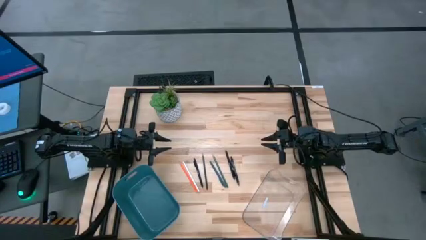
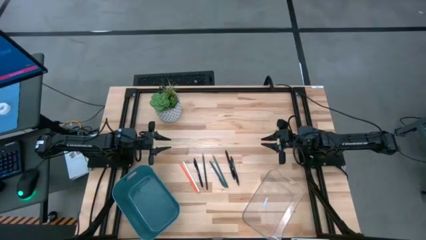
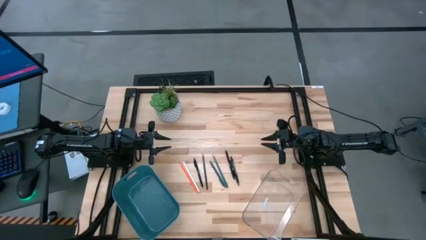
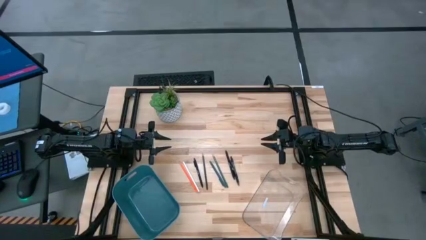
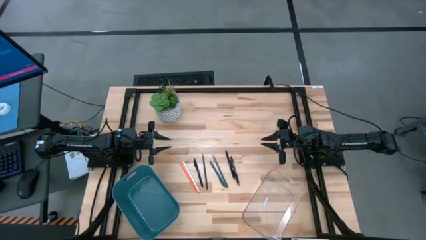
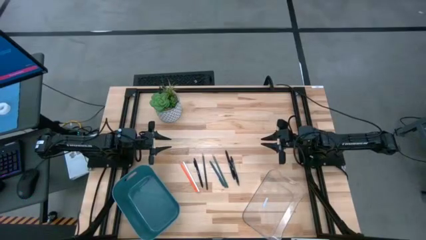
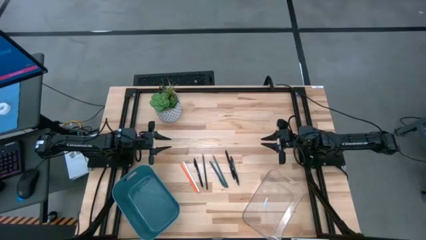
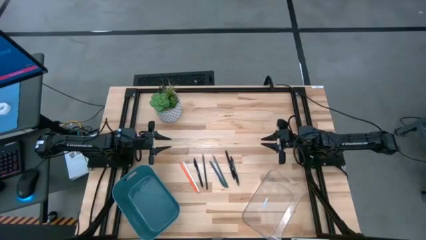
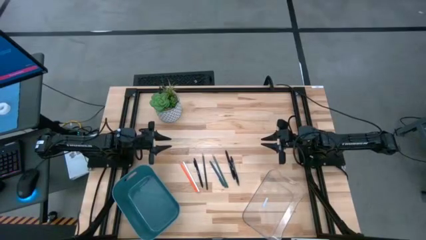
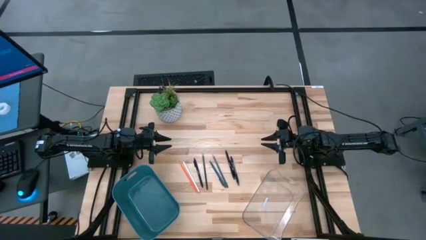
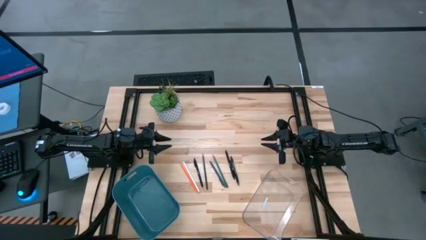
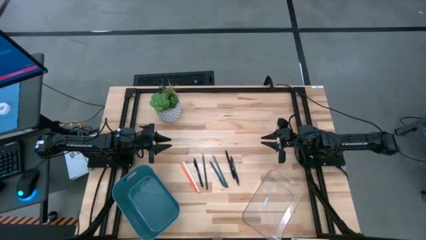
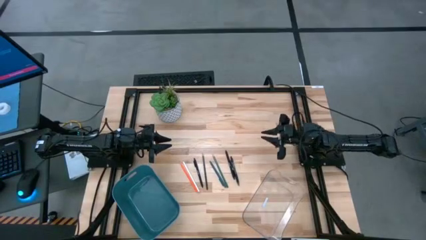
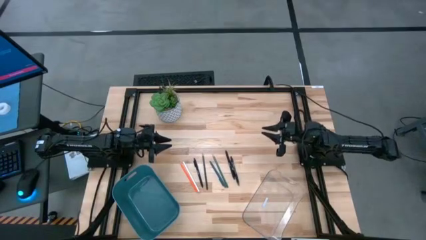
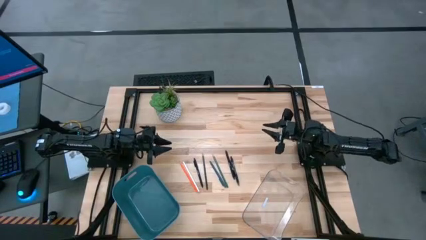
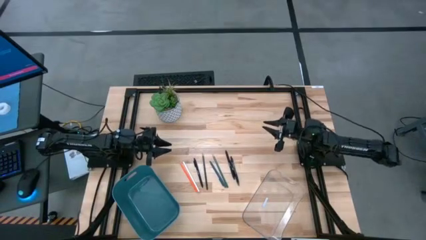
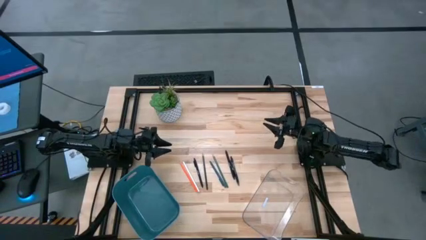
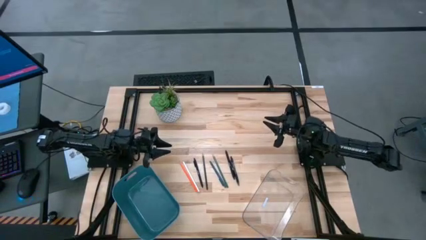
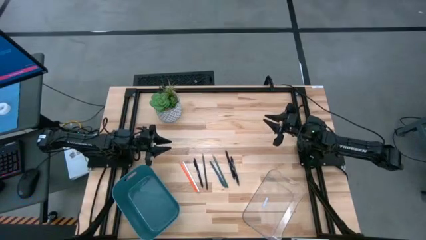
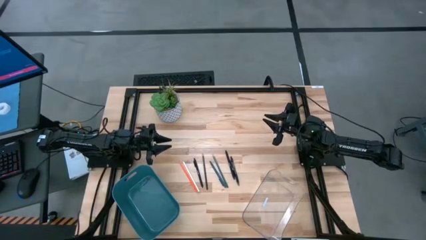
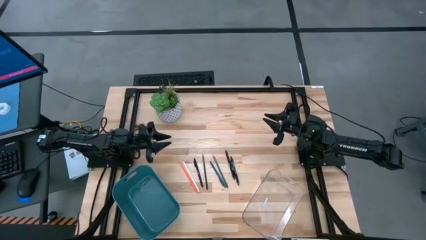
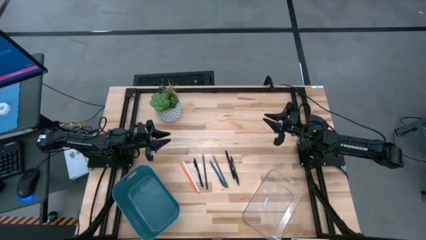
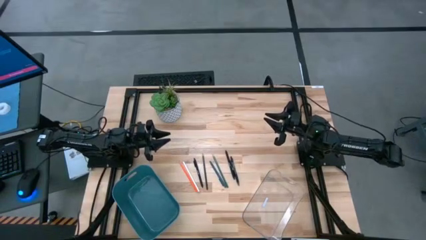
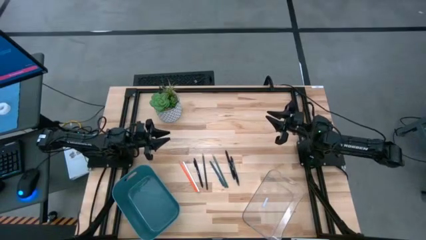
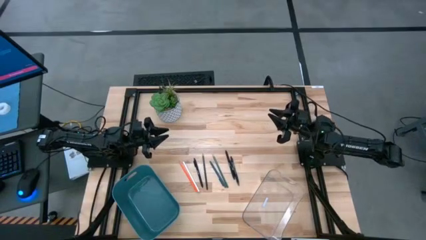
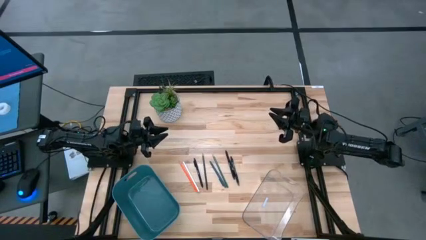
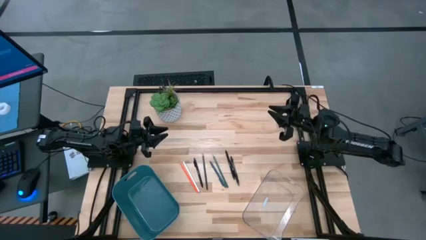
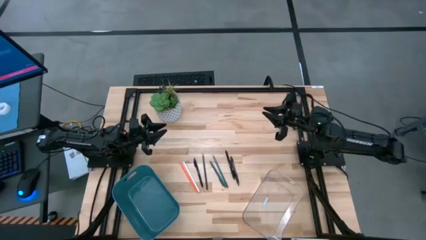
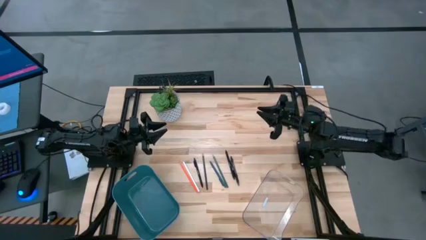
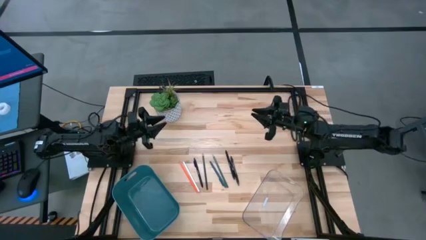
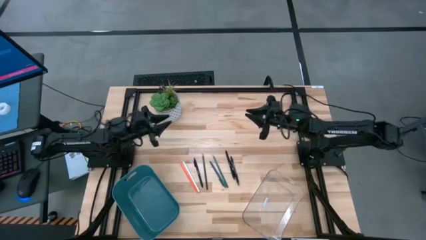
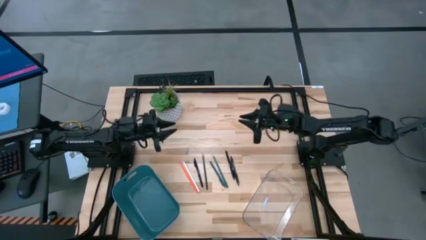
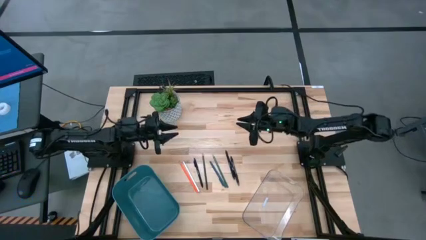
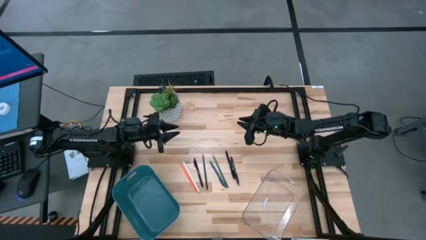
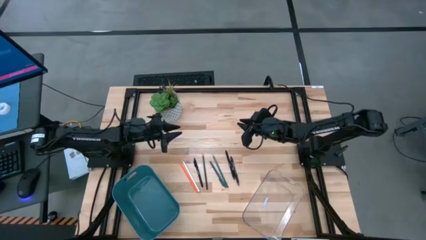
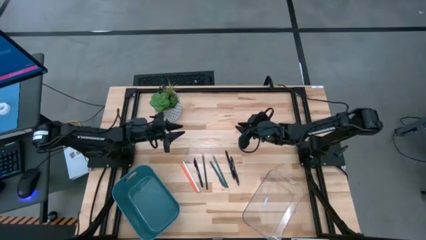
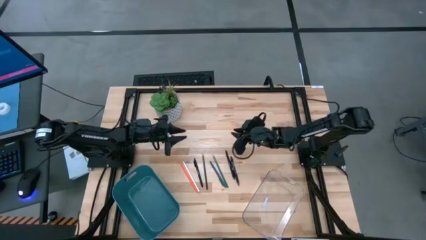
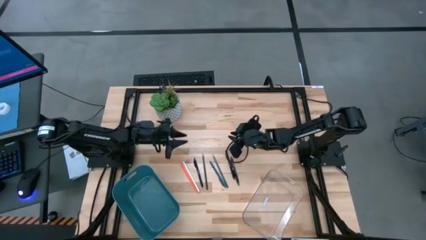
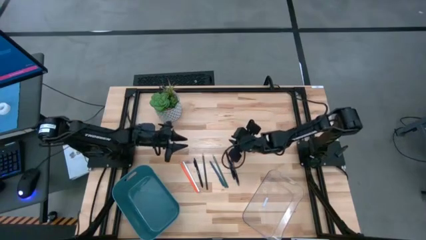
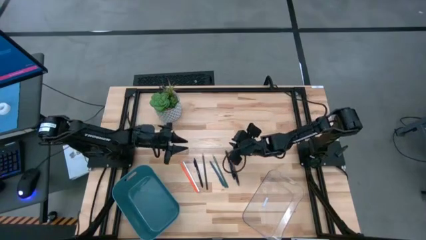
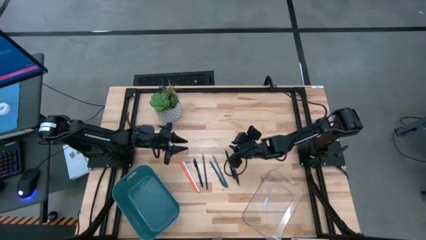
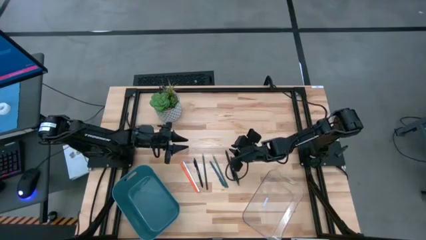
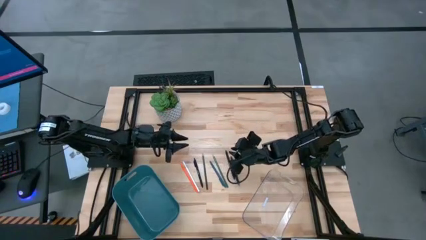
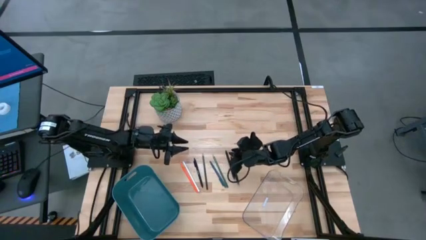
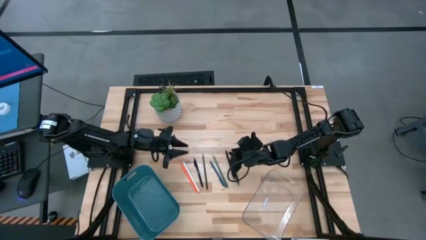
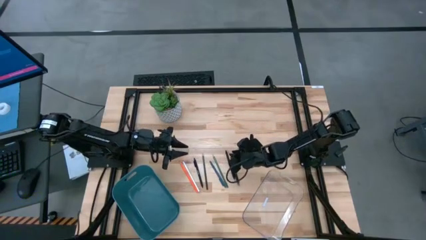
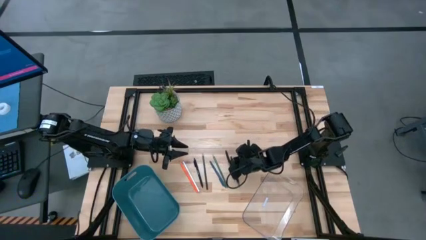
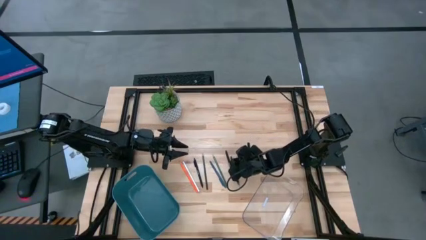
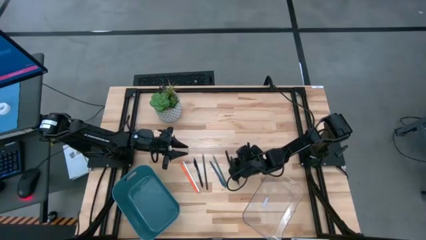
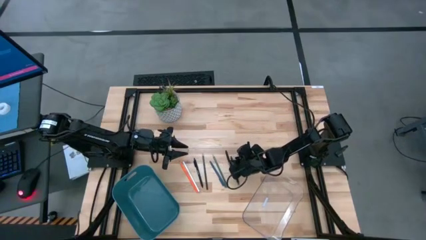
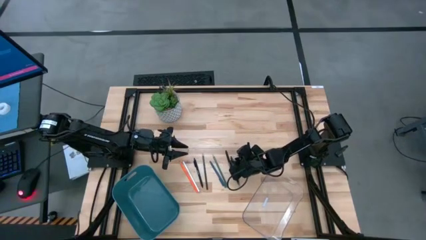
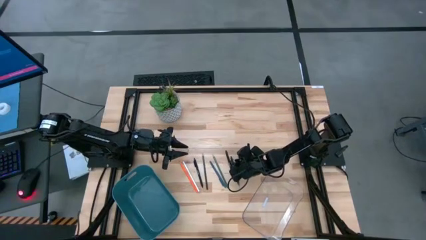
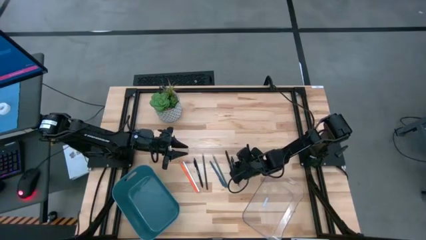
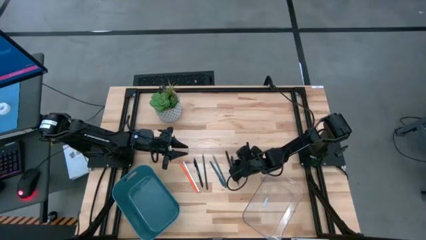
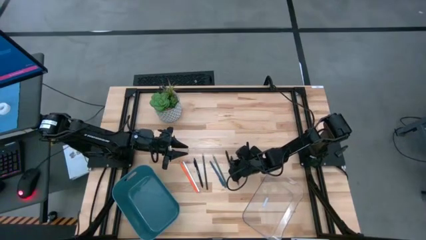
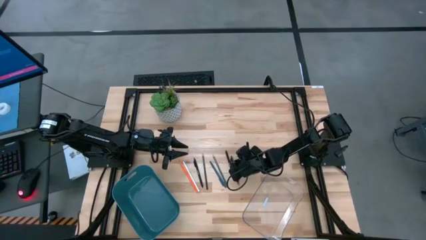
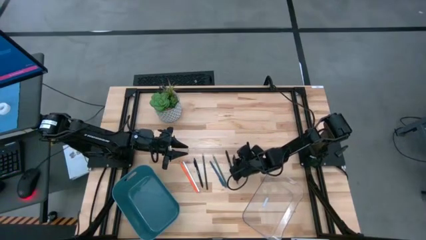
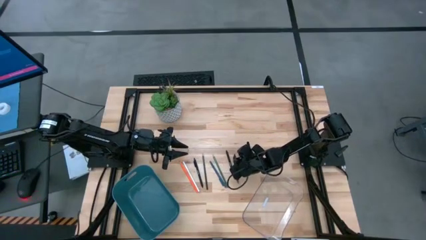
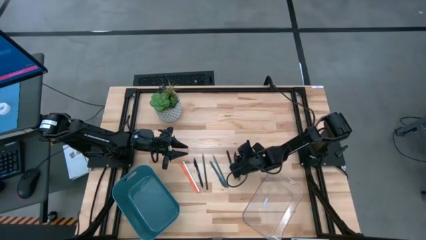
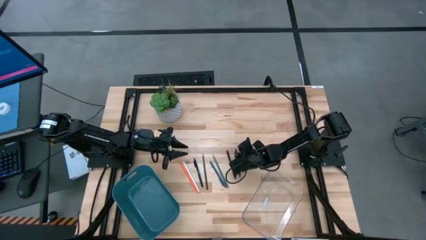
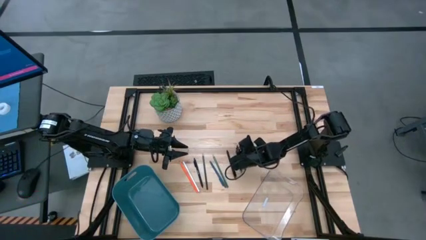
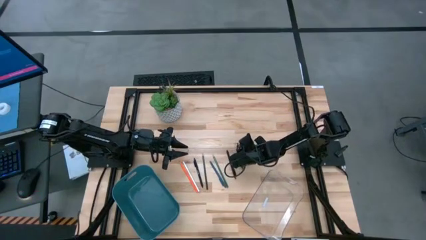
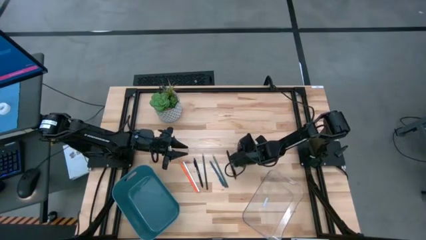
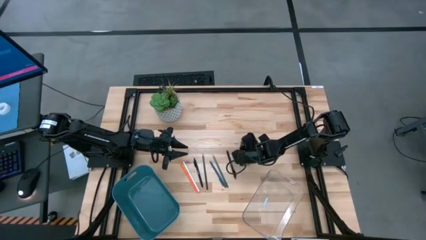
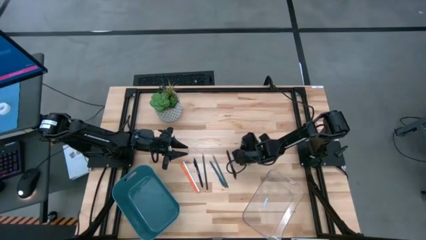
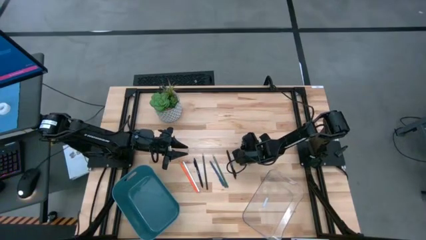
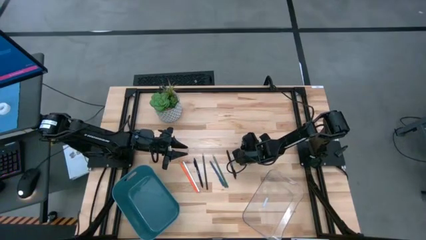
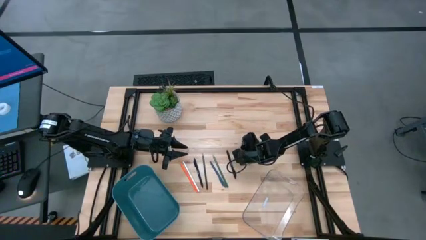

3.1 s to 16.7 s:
Task: Sort pens & pencils
Put the transparent black pen into the transparent bin
